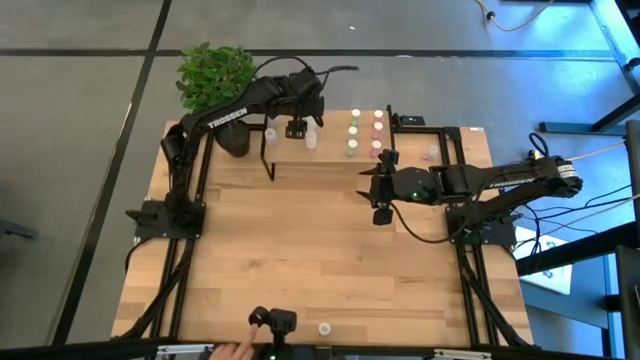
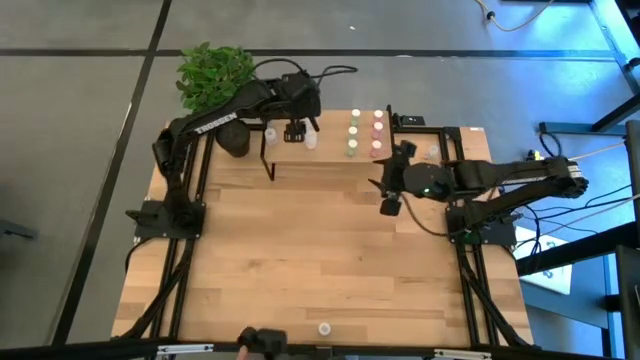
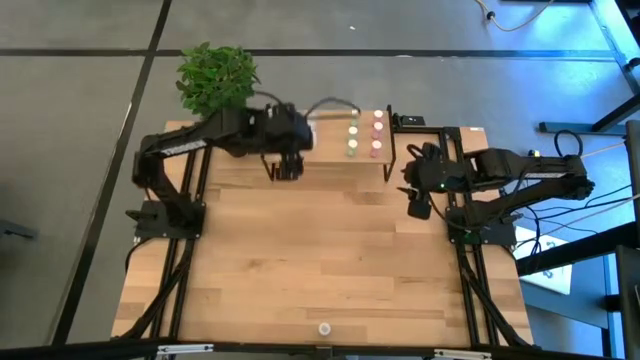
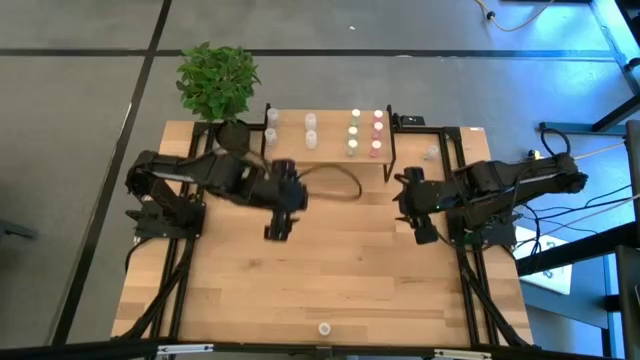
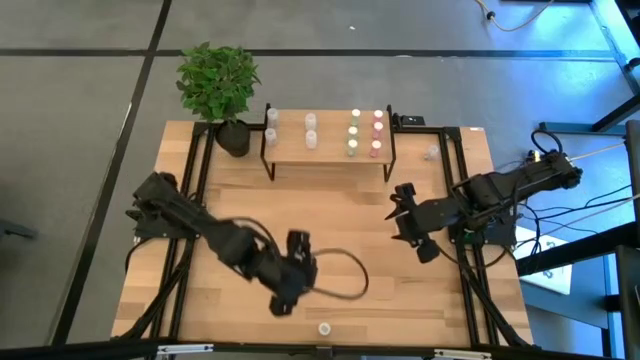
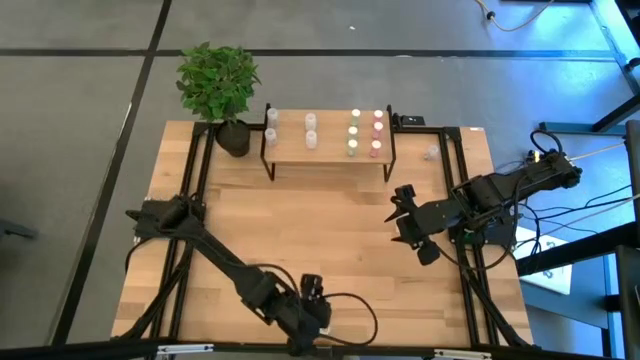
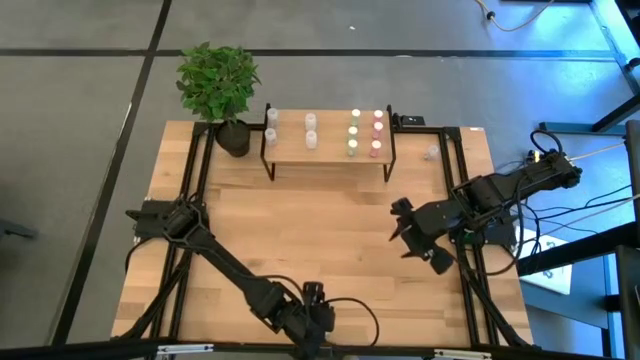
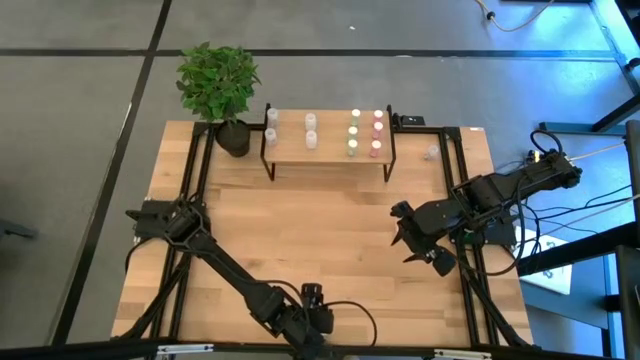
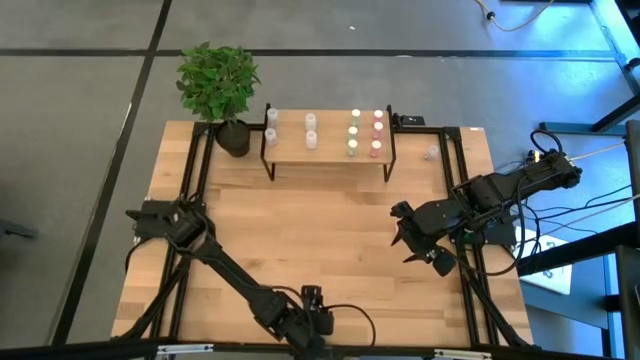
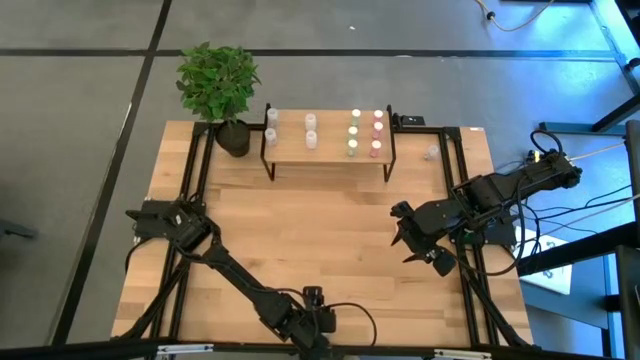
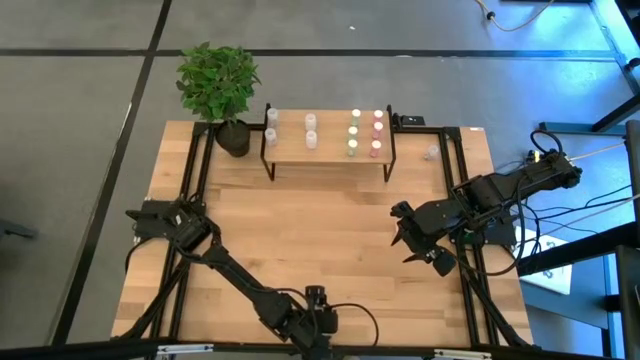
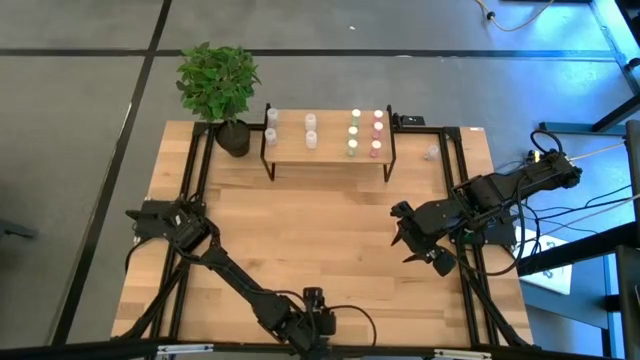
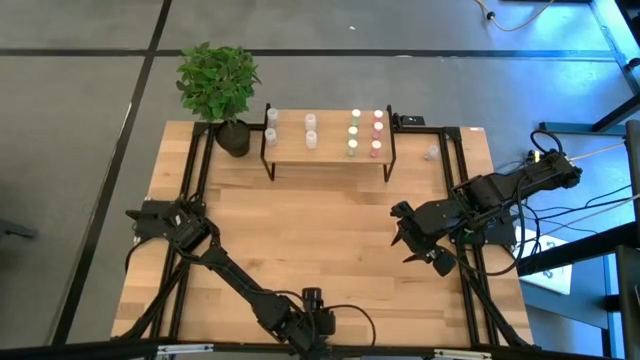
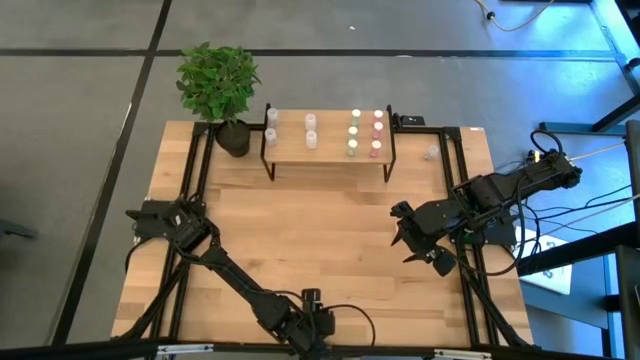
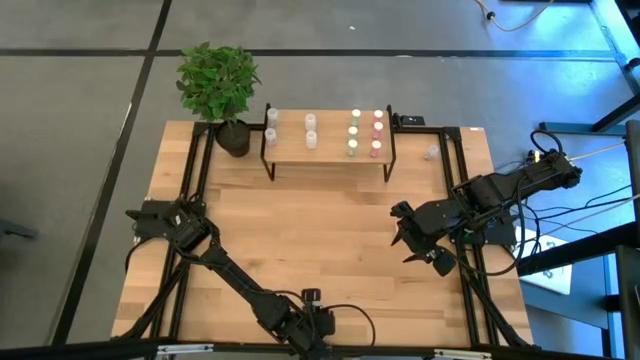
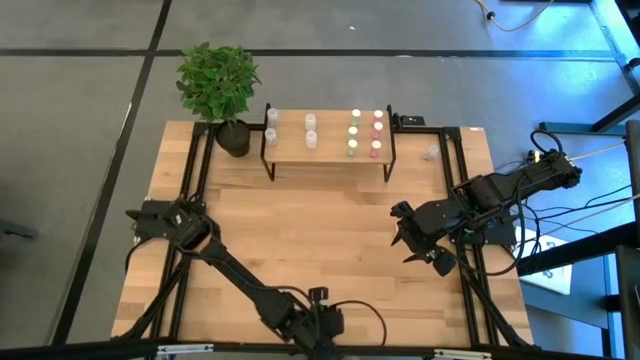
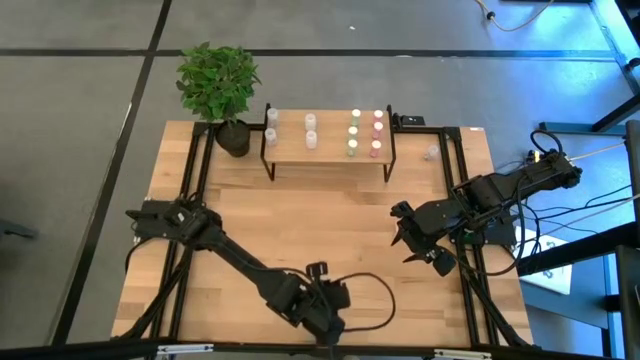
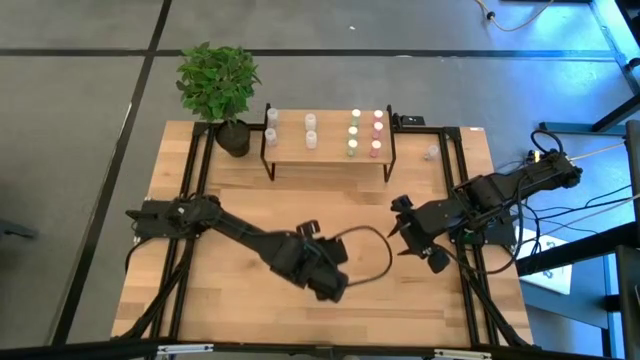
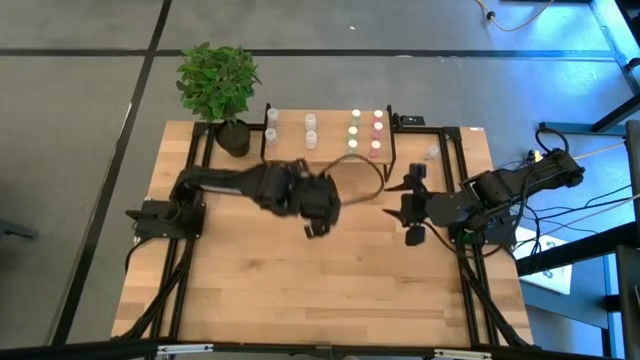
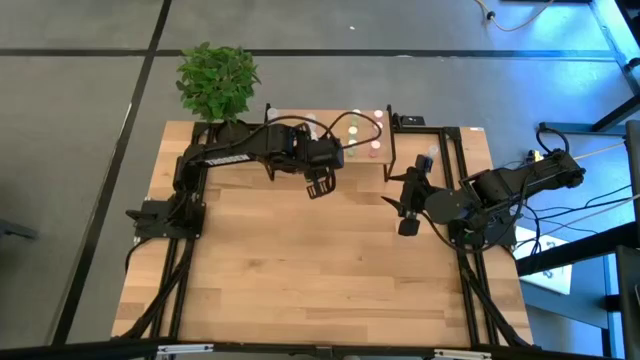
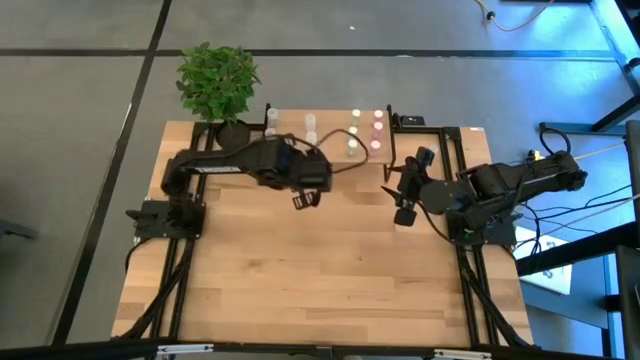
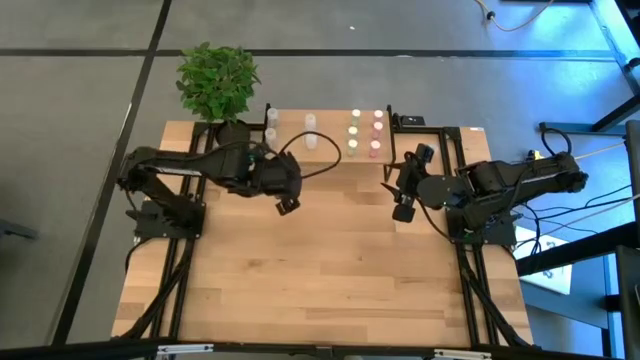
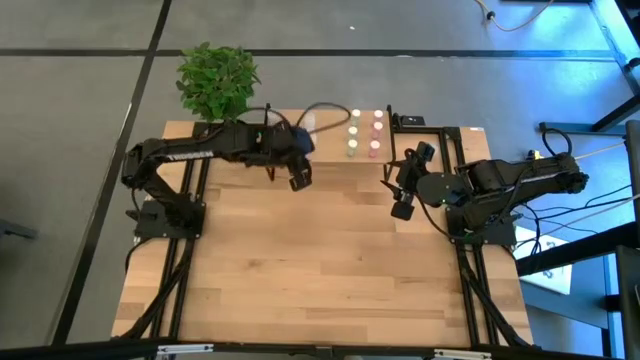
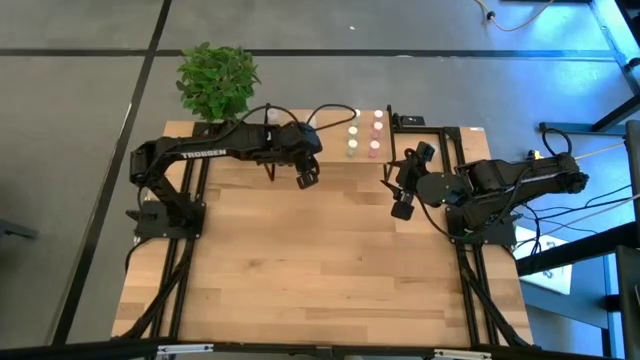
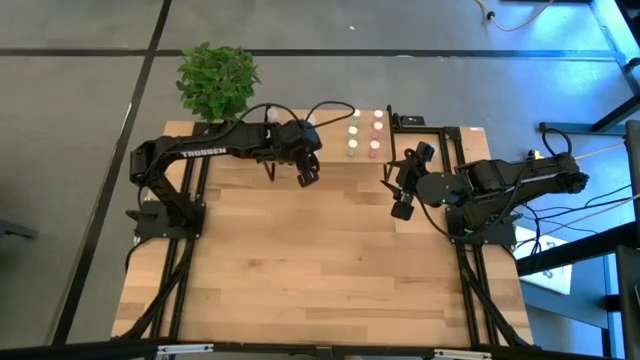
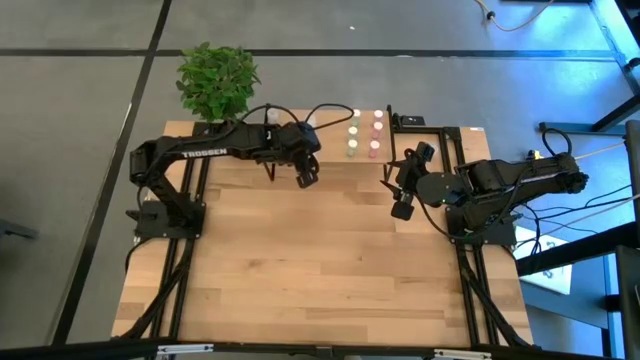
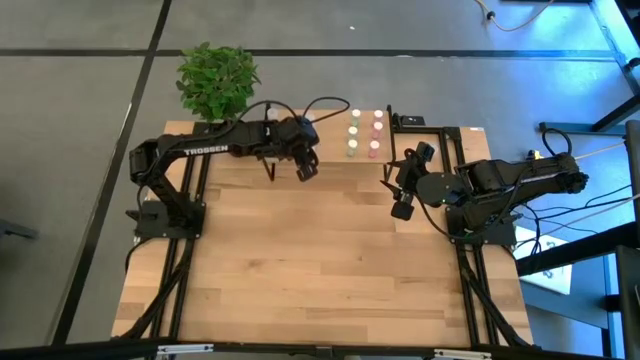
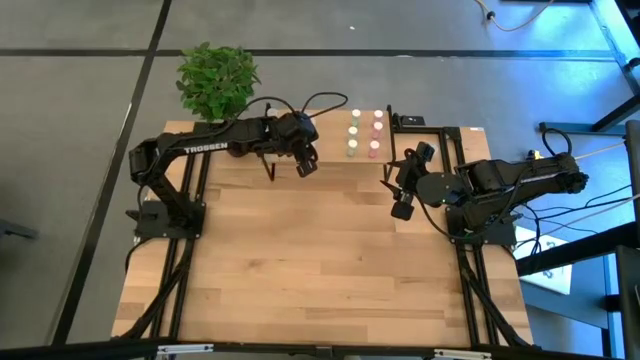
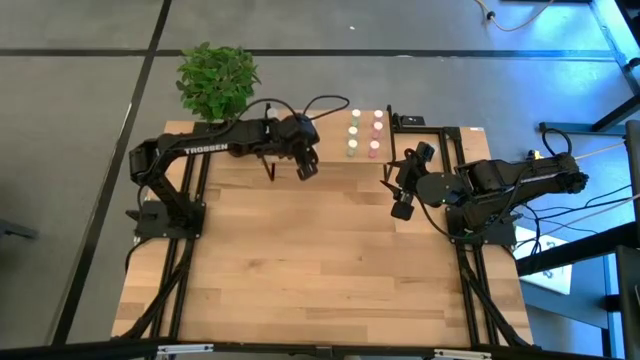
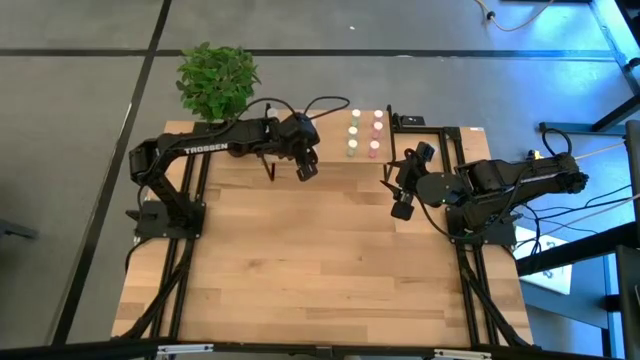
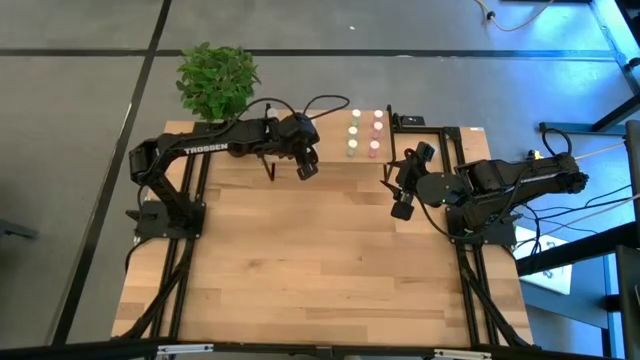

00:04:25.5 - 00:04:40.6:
Task: Pick and place medicine bottles onto shelf by color
Put the white pill bottle on the shelf aligned with the other white pill bottles

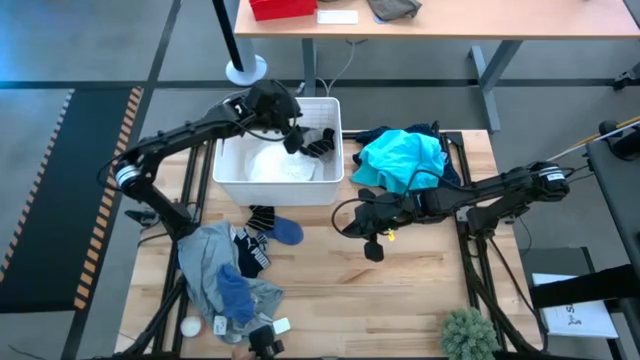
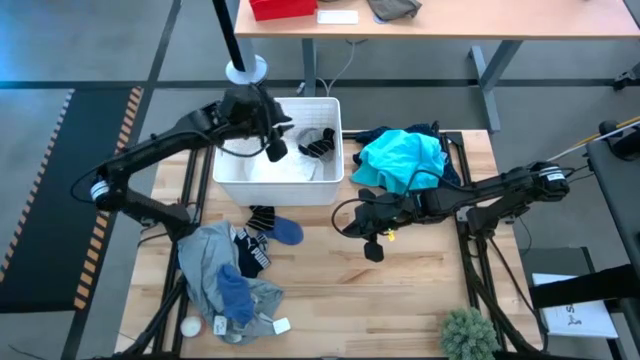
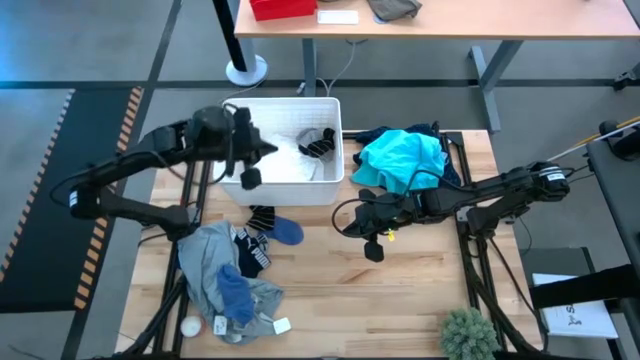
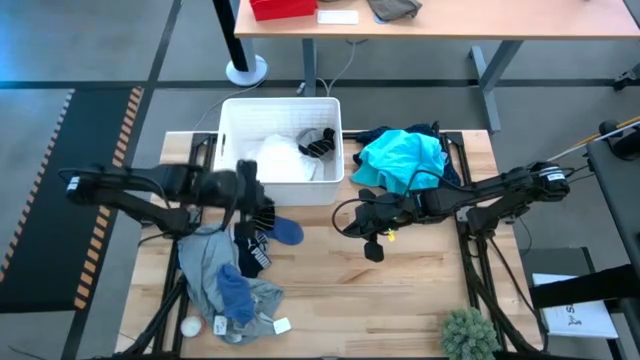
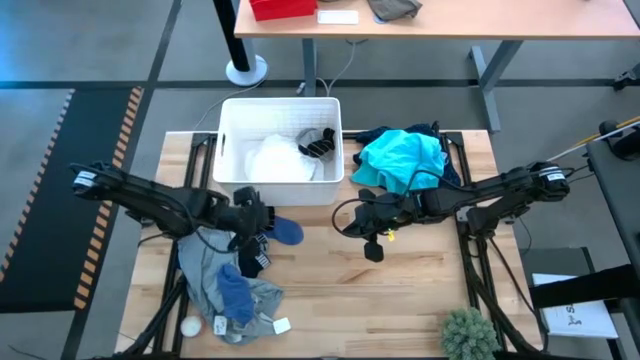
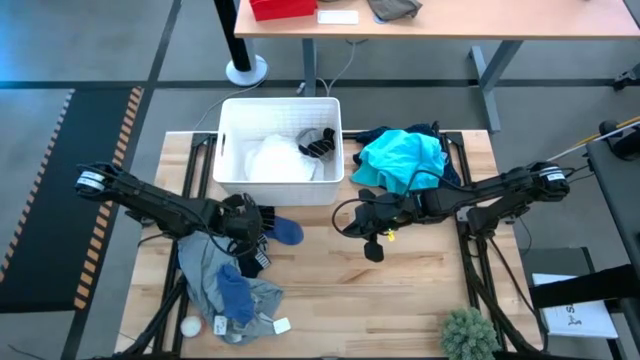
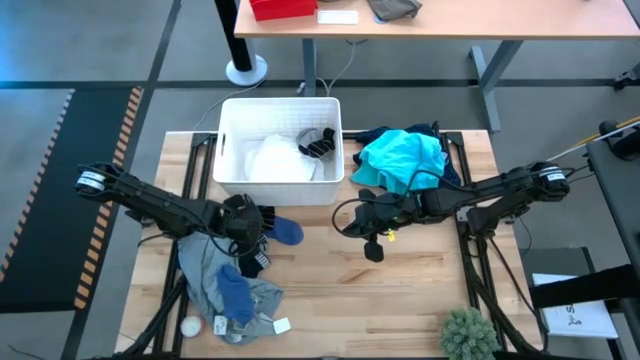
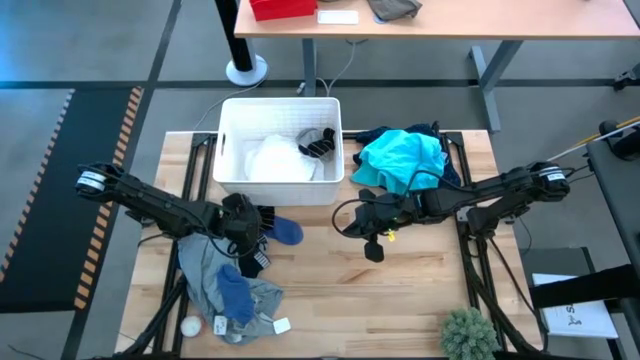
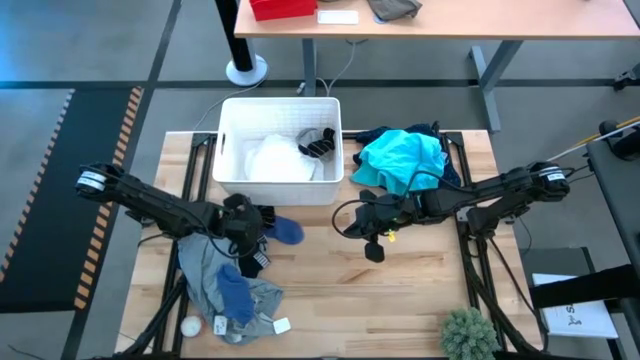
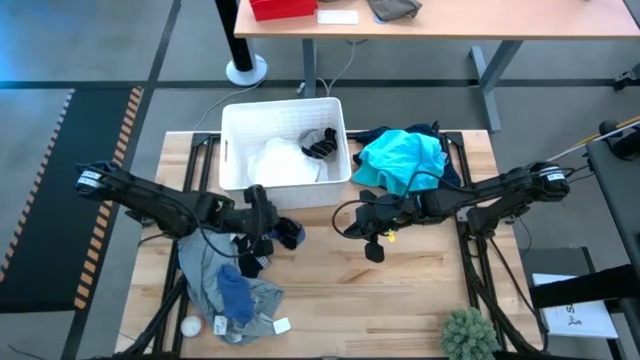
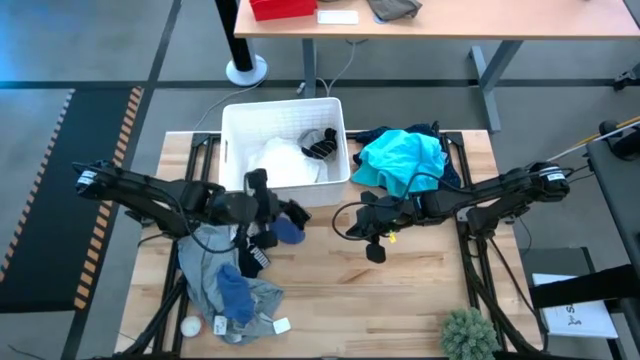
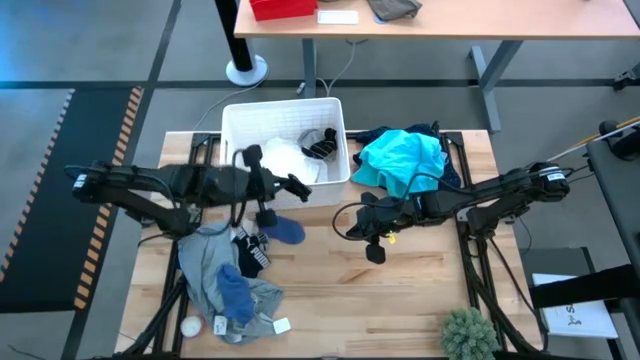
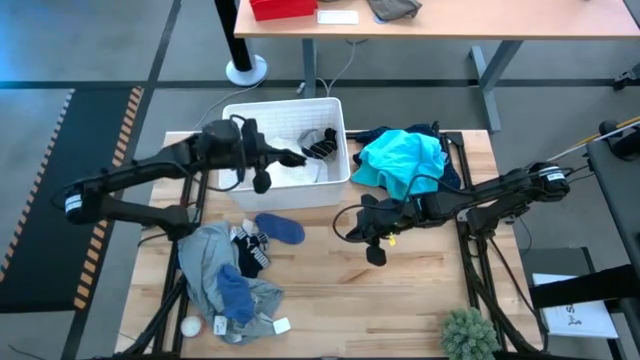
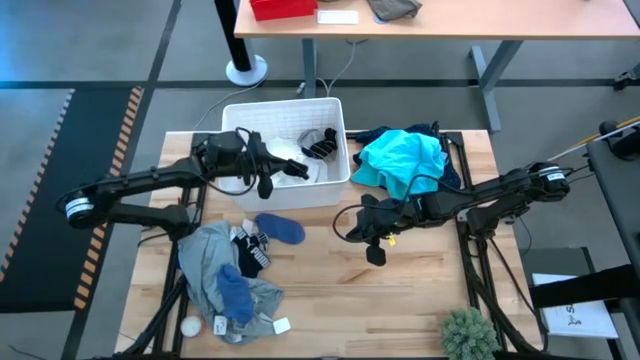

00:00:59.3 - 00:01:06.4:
Task: Sort clothes
Put the black sock into the white bin
